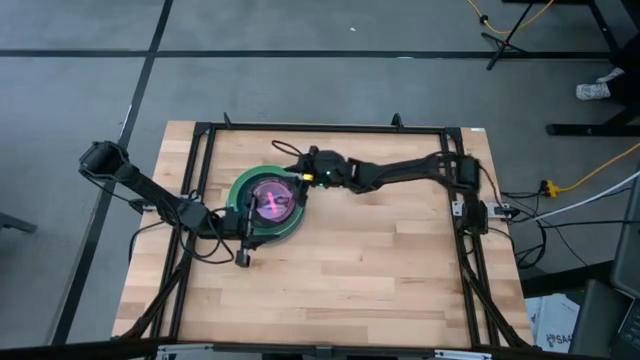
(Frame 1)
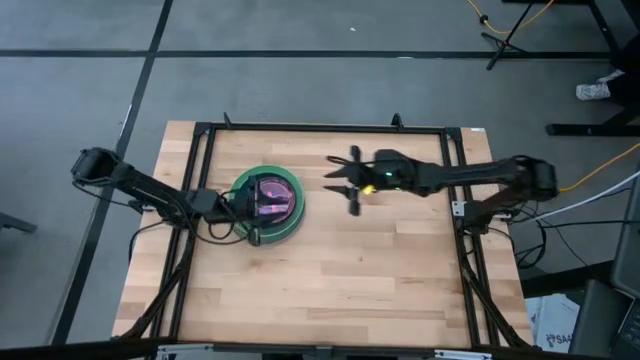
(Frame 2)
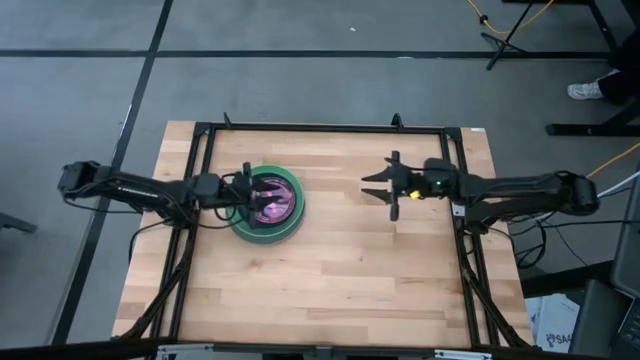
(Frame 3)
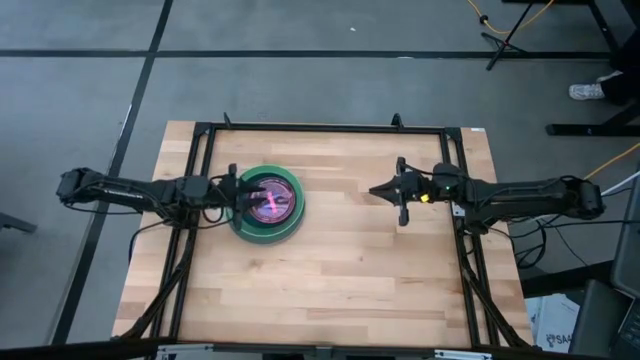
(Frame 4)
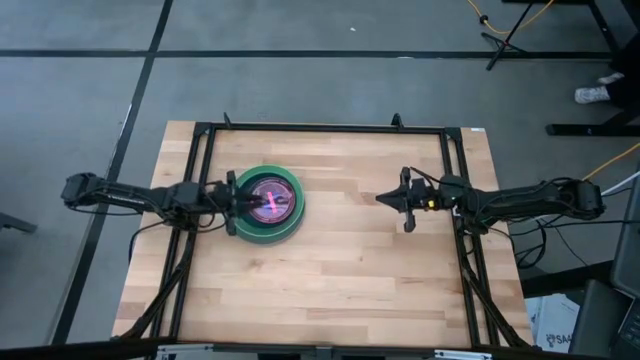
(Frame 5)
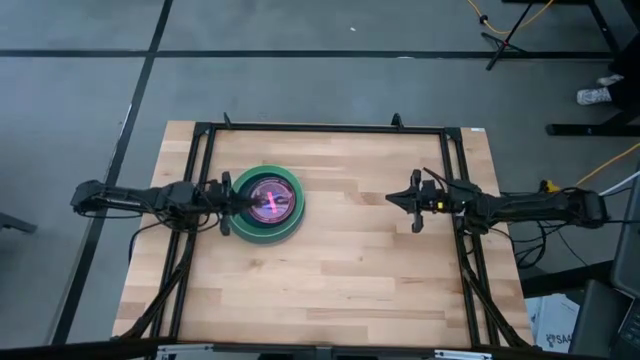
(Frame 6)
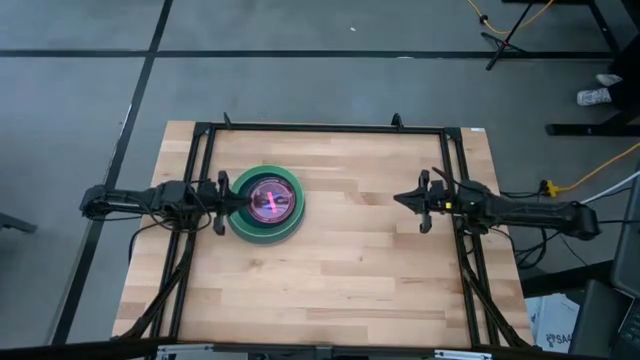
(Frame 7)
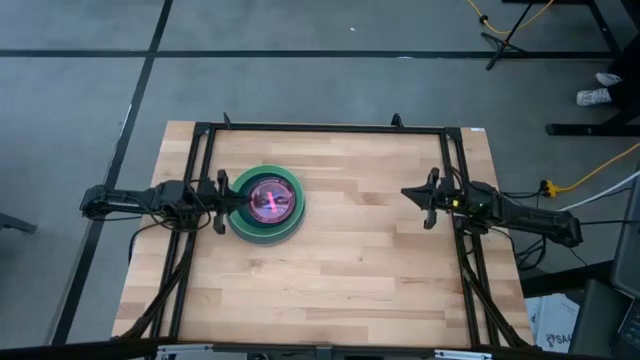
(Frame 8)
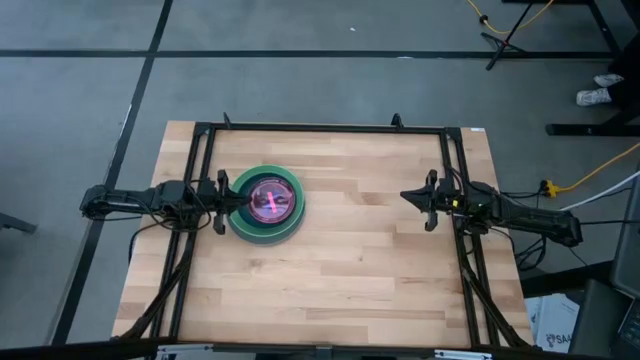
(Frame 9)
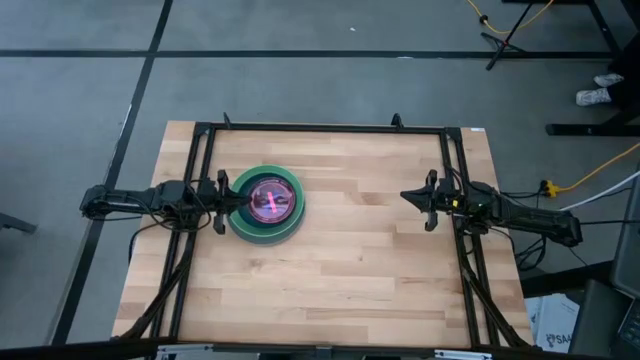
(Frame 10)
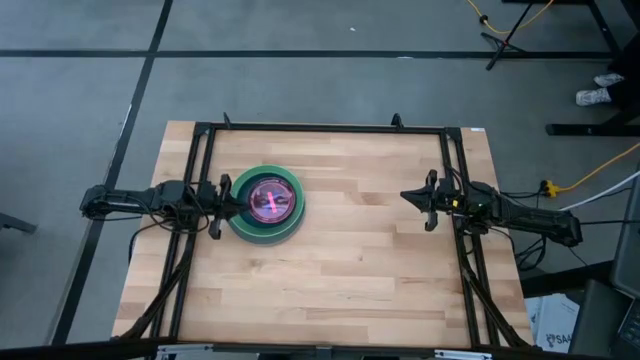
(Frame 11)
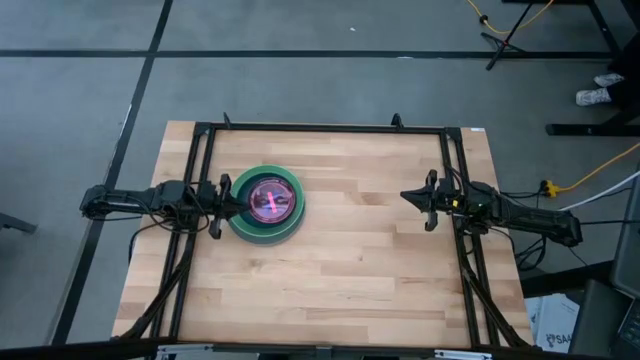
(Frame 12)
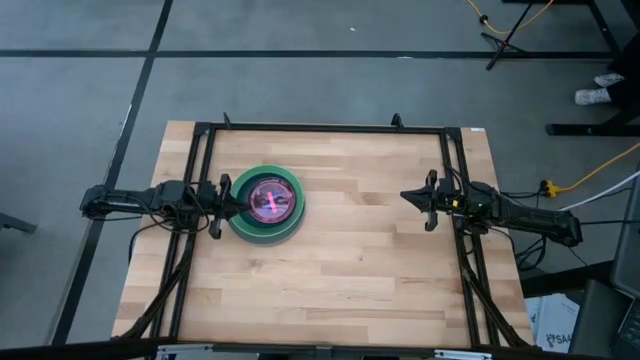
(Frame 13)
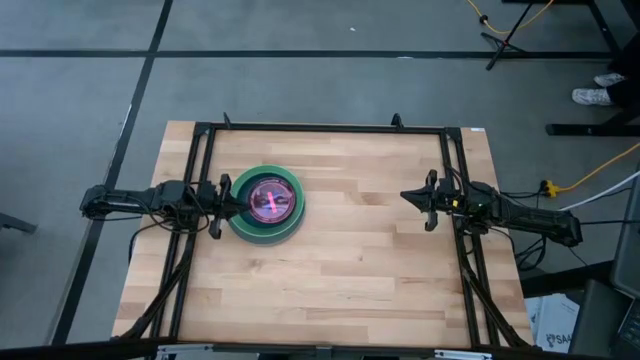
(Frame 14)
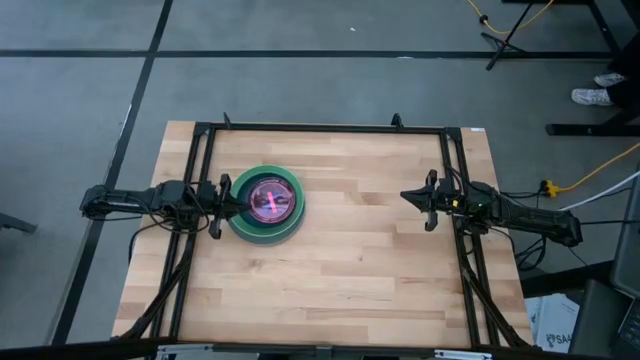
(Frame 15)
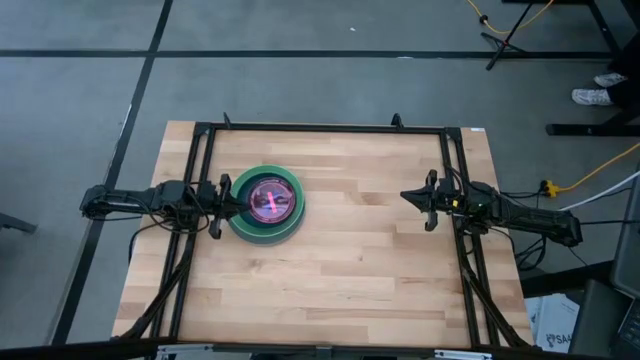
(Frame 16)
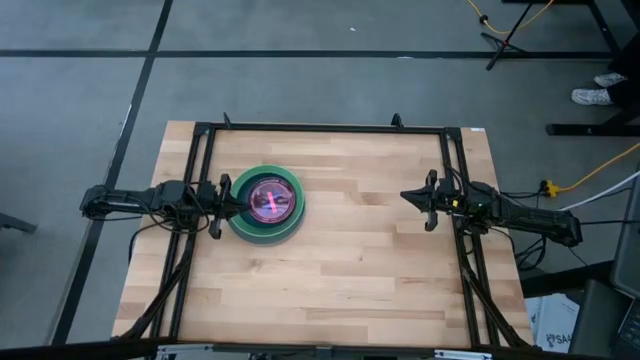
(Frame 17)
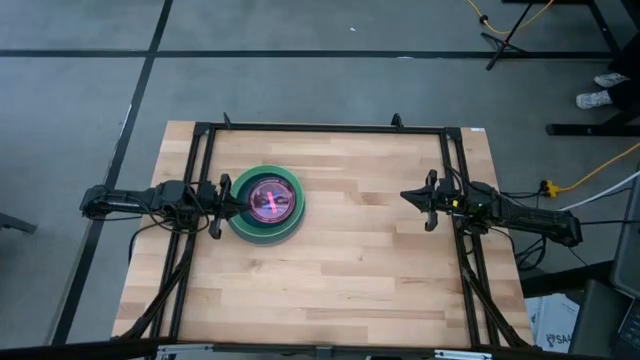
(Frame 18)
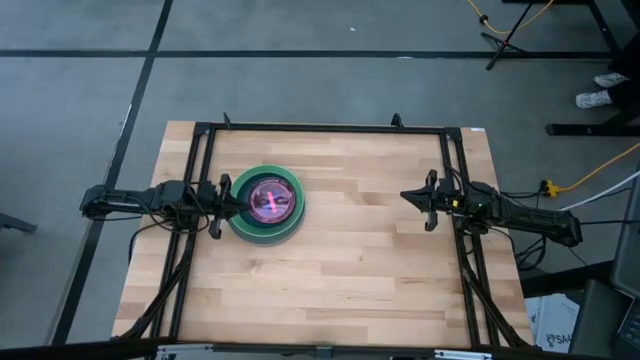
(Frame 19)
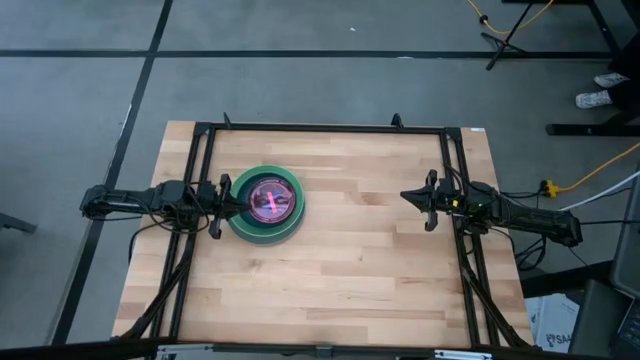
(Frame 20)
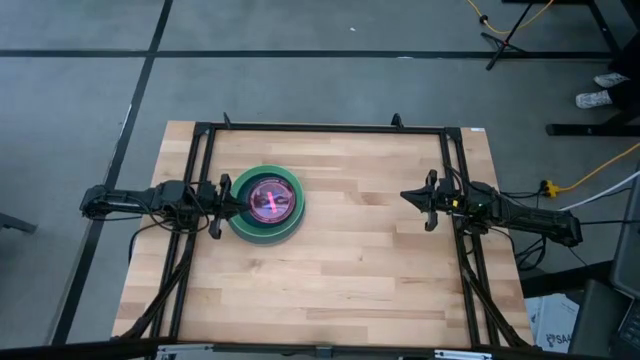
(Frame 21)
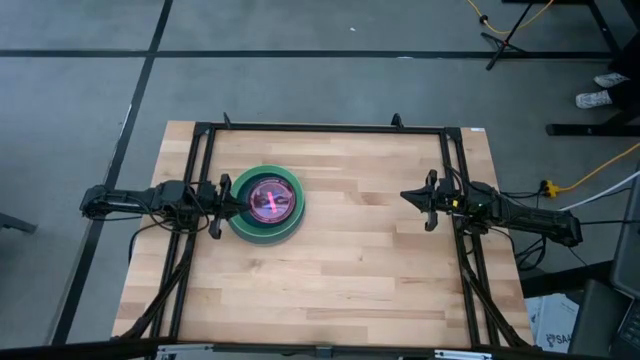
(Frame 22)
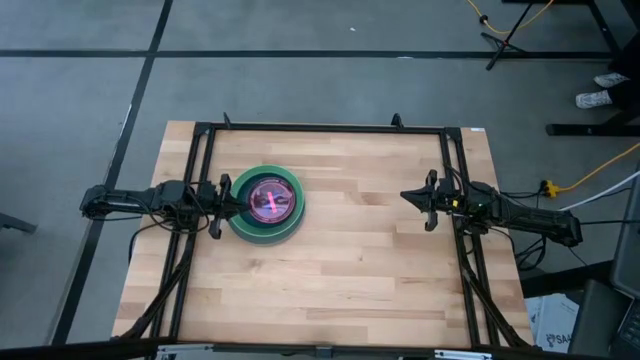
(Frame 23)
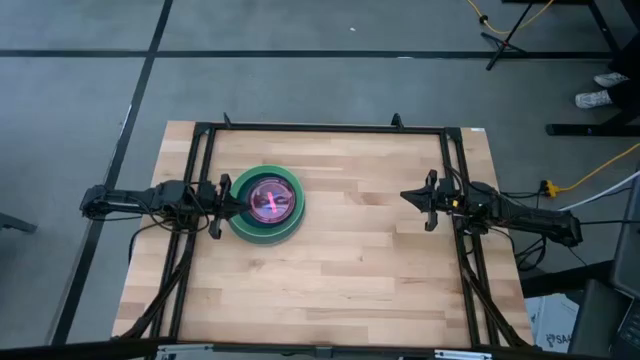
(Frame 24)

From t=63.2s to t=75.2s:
Task: Stack plastic plates
Return to Home Position

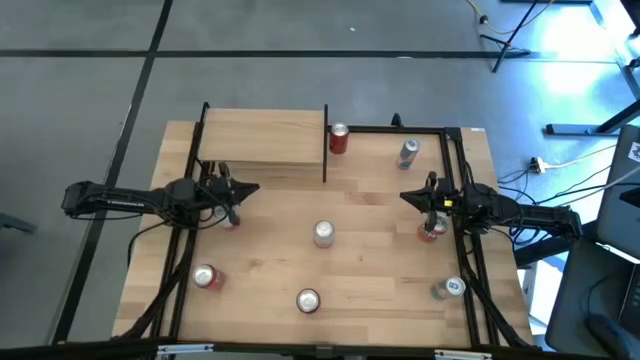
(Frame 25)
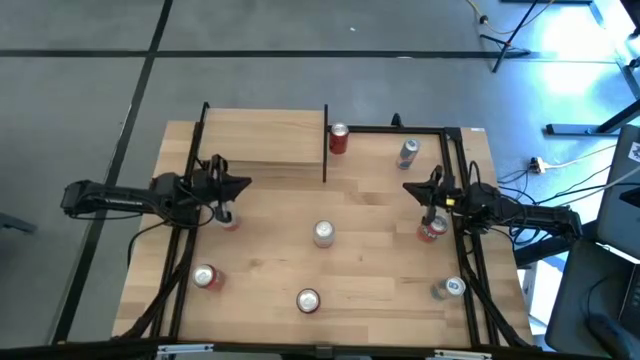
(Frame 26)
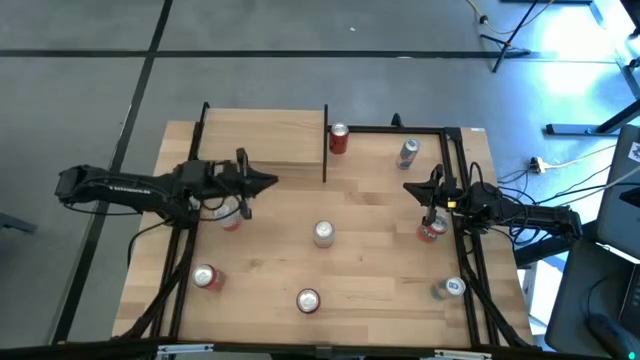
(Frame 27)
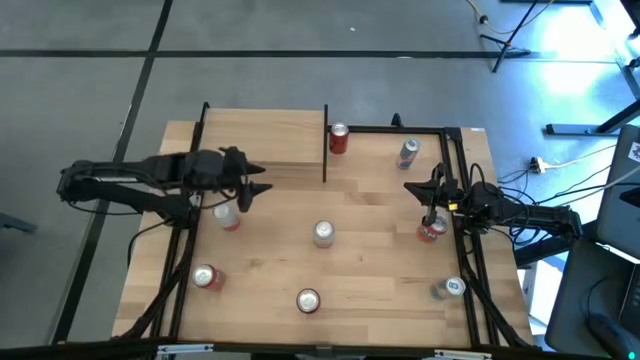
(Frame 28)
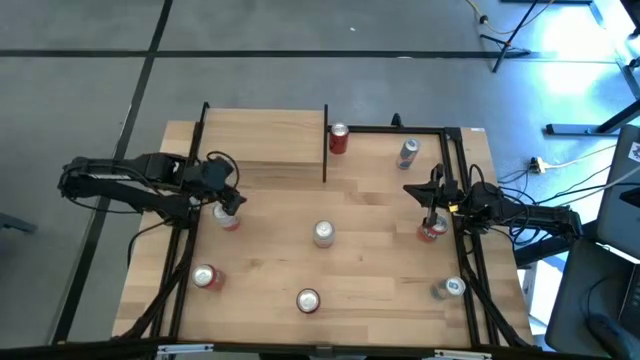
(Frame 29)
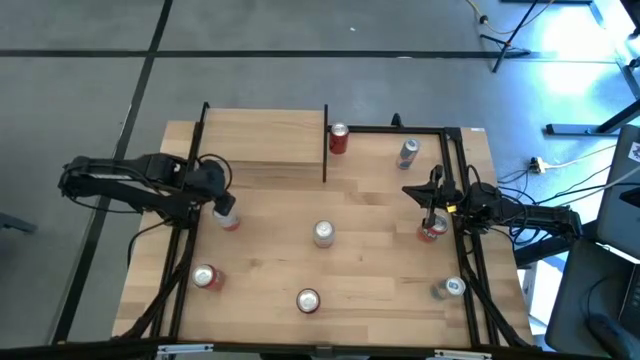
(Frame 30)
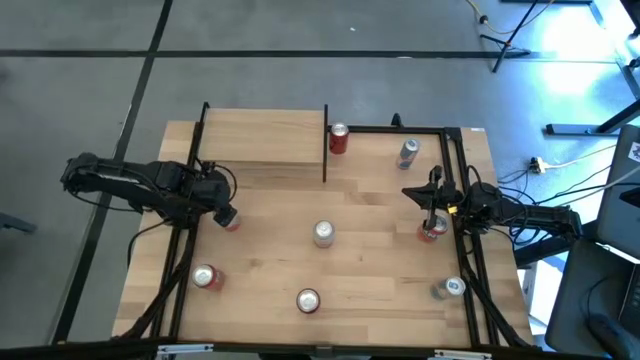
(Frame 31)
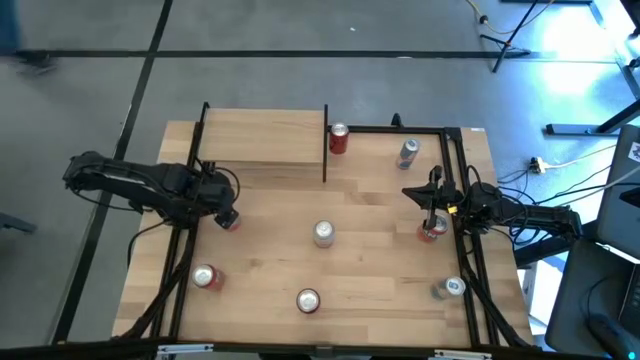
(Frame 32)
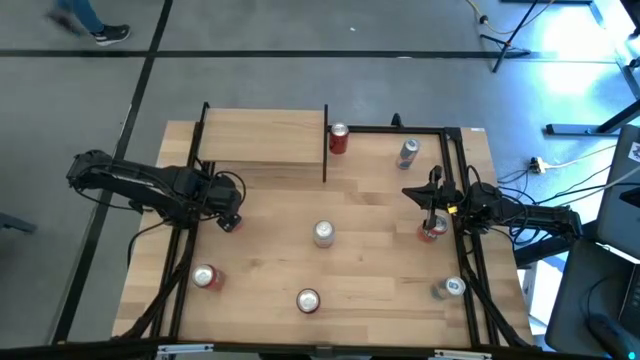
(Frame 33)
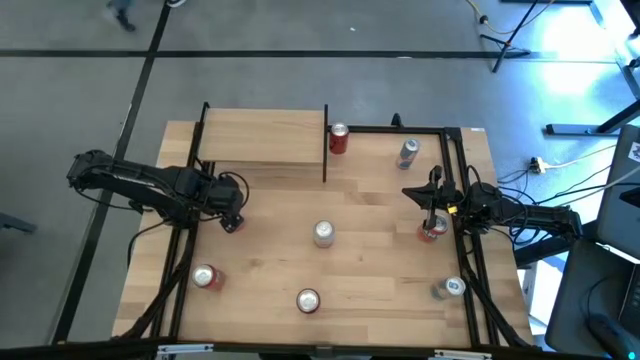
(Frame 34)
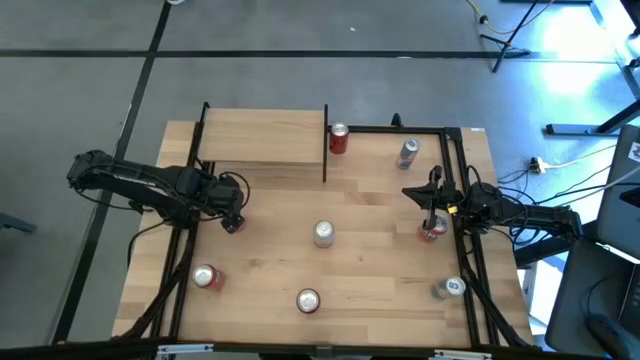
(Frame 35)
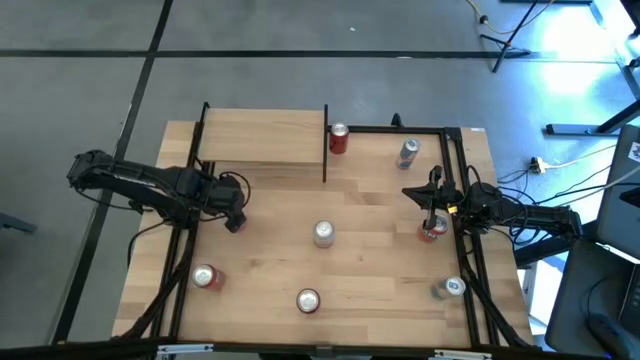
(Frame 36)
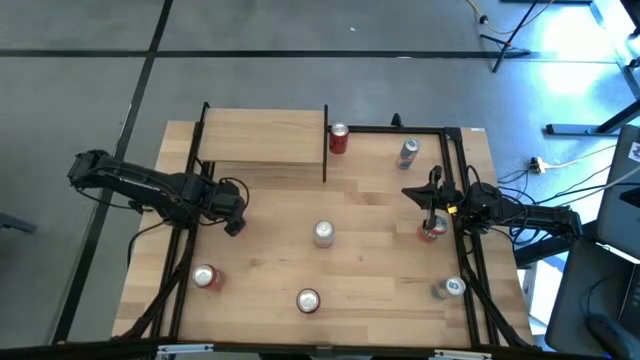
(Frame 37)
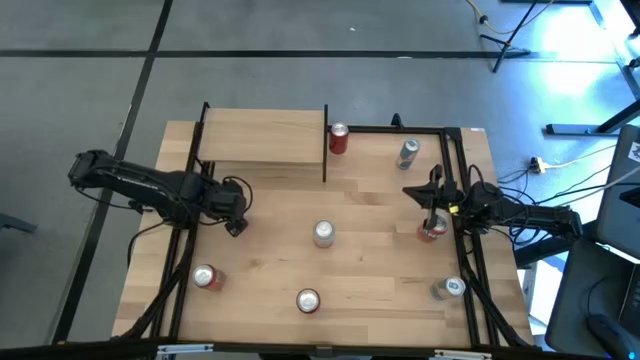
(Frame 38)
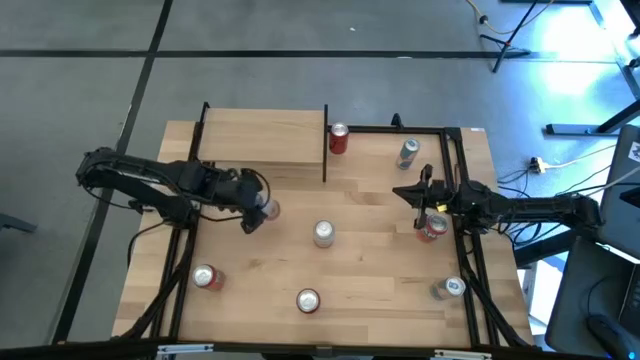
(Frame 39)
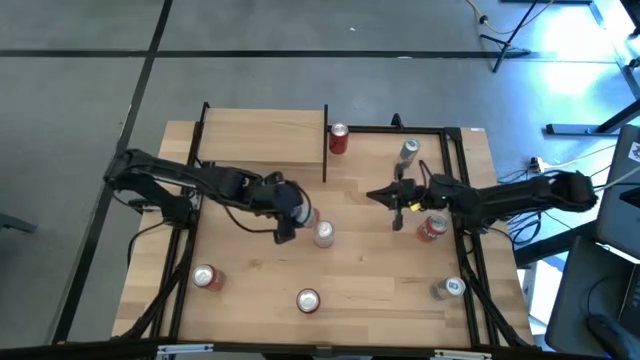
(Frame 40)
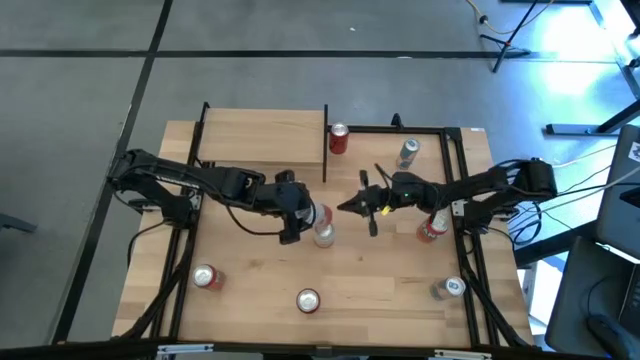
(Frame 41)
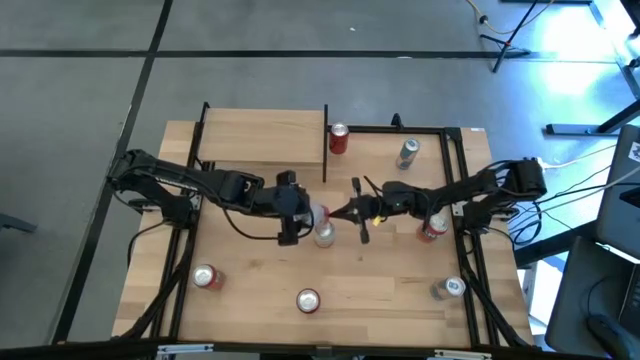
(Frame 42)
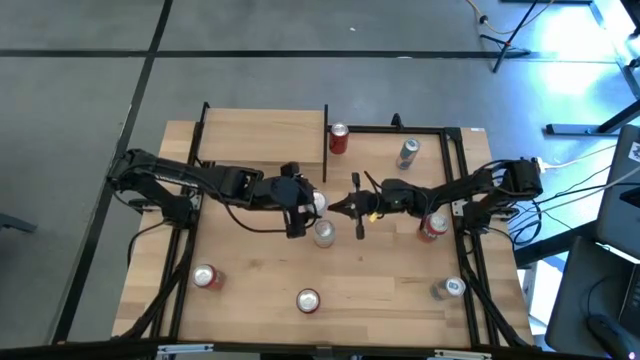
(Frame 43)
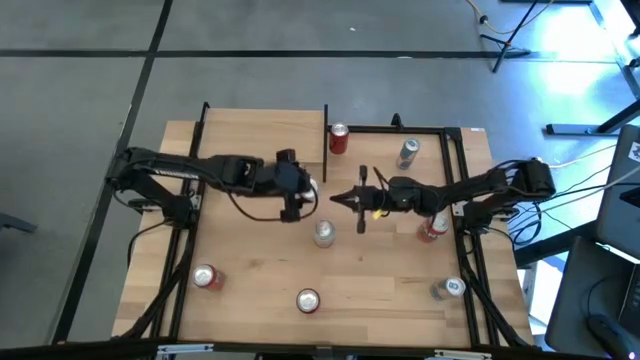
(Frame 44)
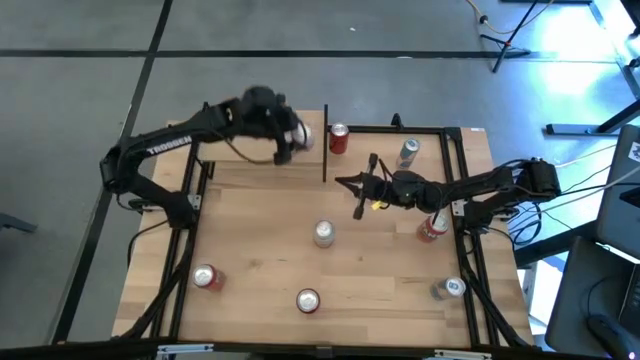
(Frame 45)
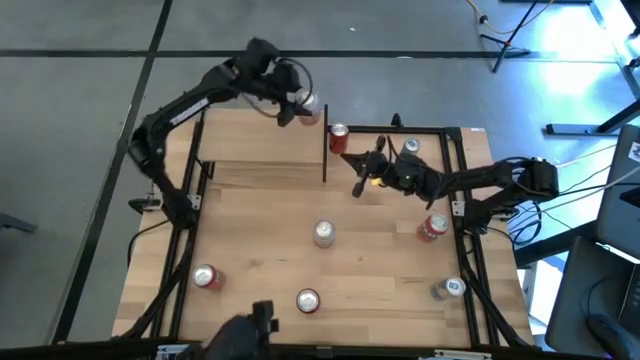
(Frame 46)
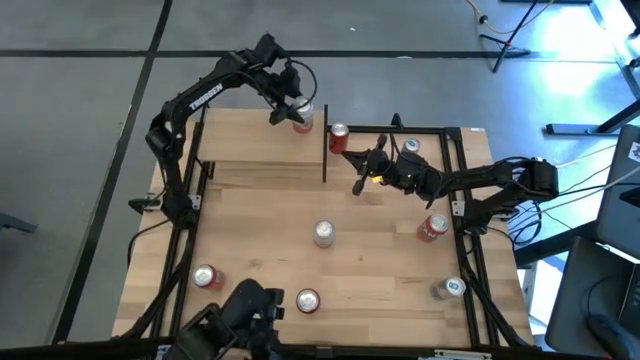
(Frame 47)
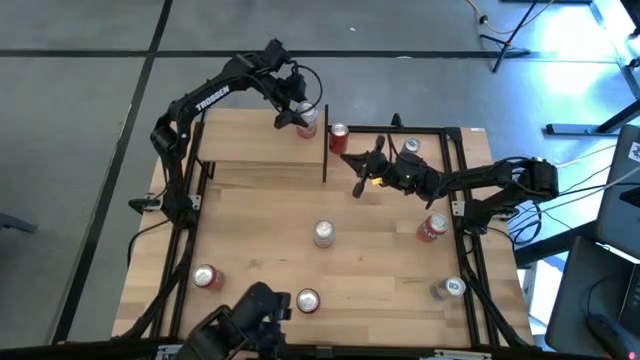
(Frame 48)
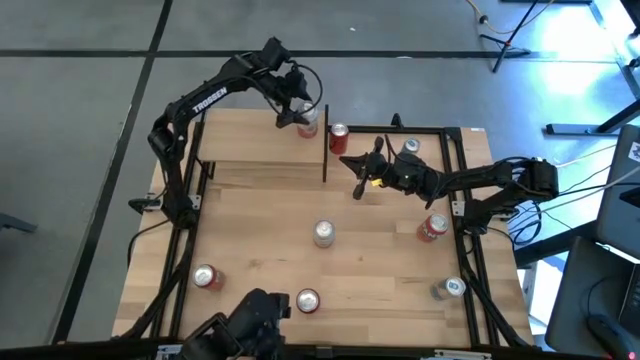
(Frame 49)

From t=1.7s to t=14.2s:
Task: Place canned beverage on shelf
Put the left pink soda can on the shelf
